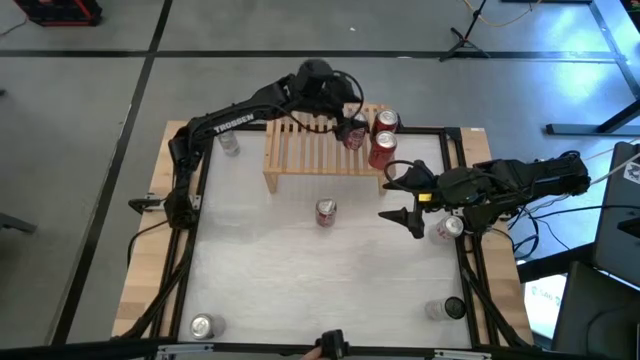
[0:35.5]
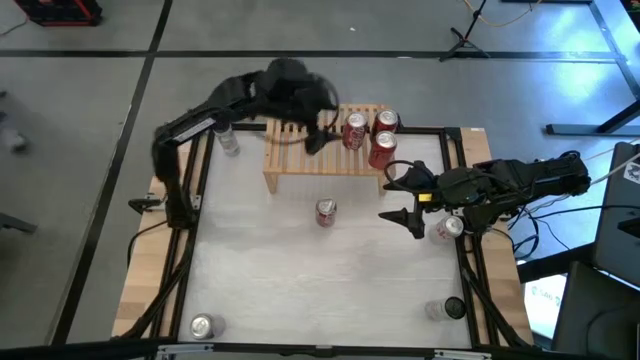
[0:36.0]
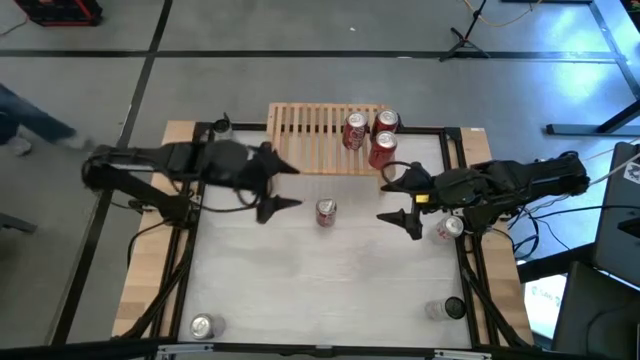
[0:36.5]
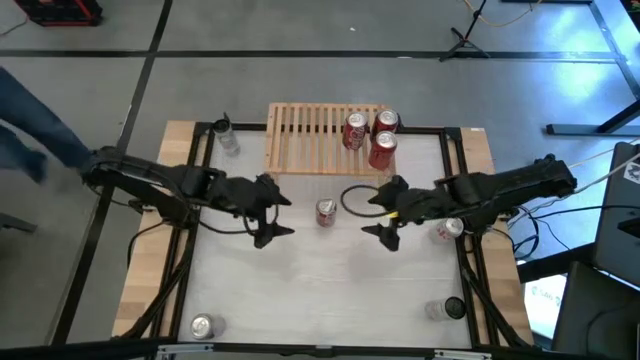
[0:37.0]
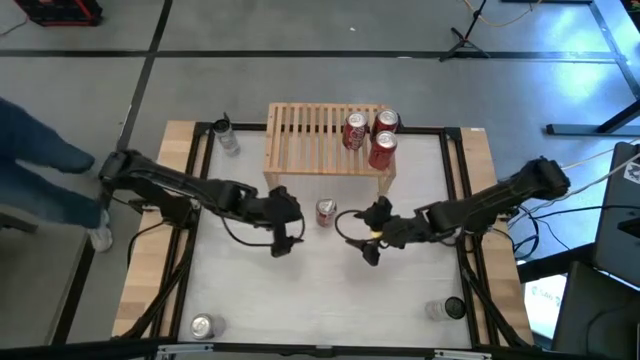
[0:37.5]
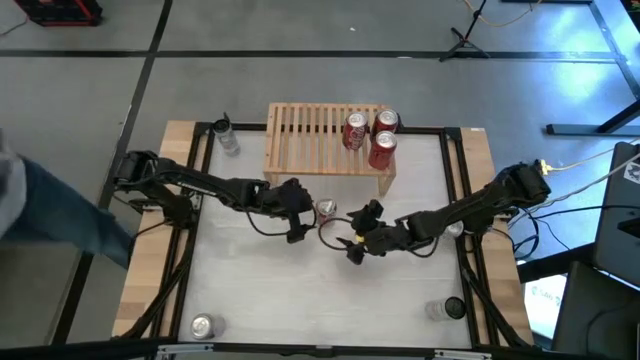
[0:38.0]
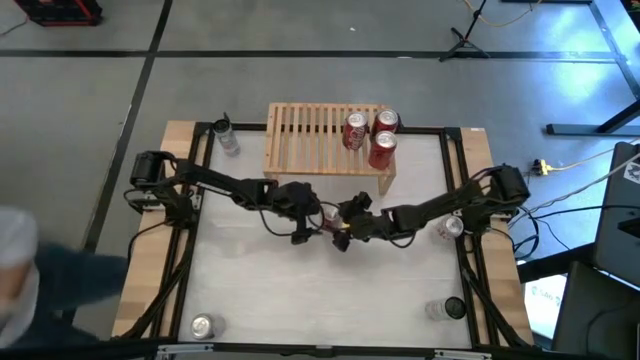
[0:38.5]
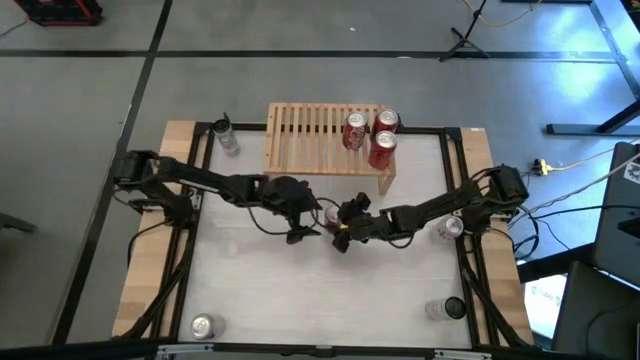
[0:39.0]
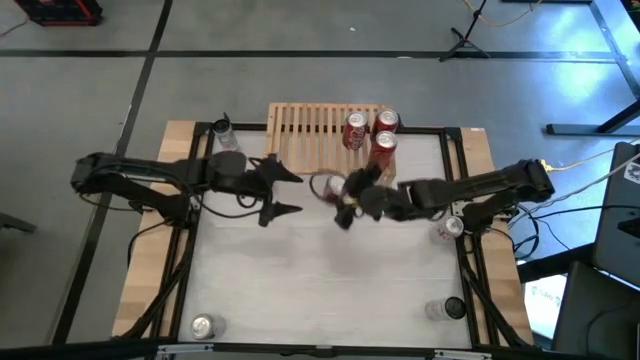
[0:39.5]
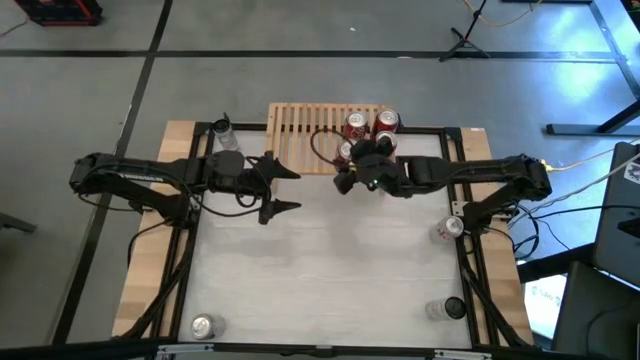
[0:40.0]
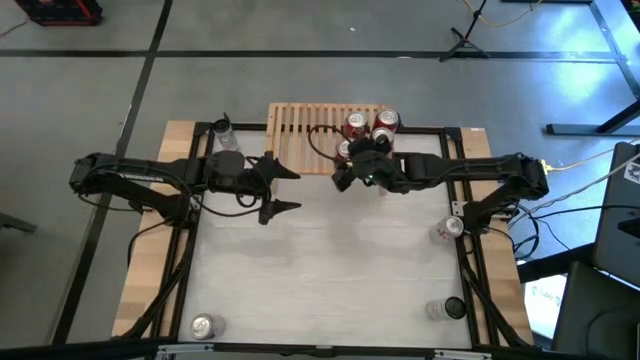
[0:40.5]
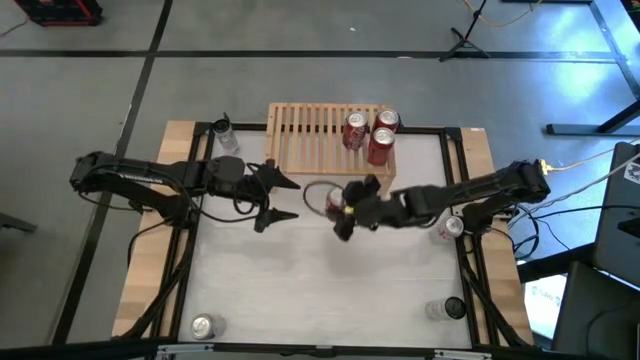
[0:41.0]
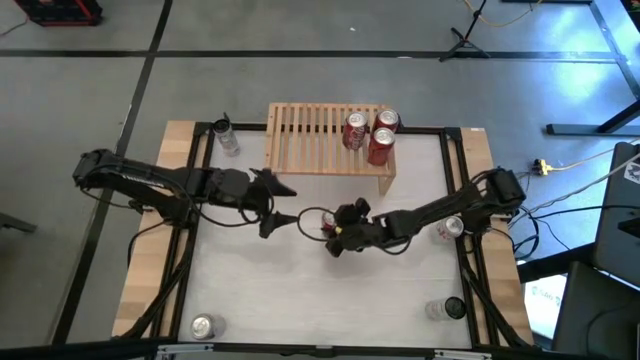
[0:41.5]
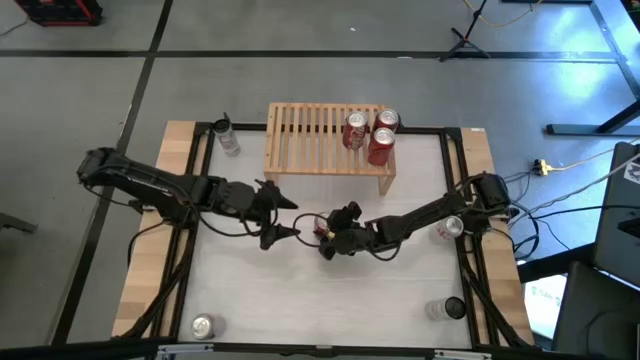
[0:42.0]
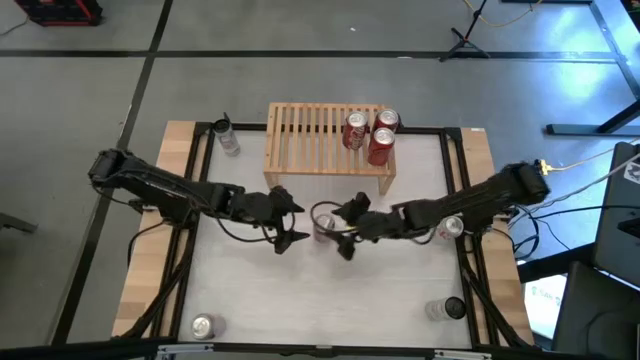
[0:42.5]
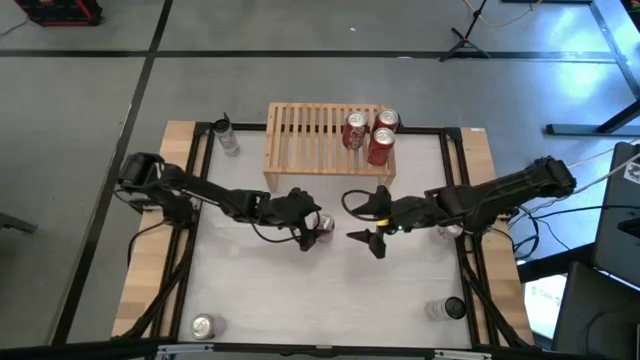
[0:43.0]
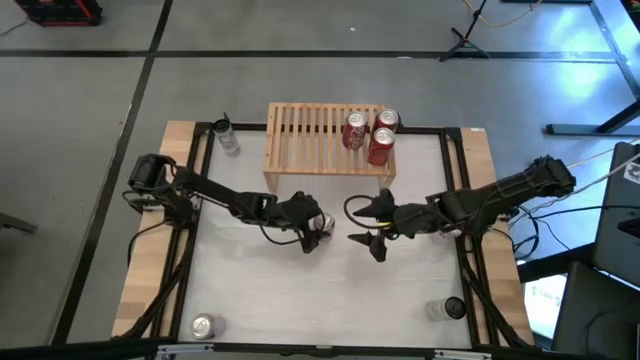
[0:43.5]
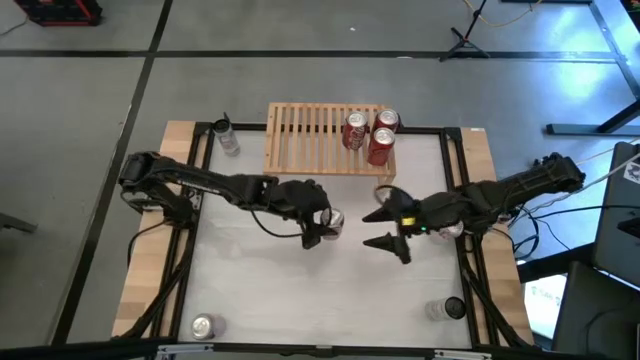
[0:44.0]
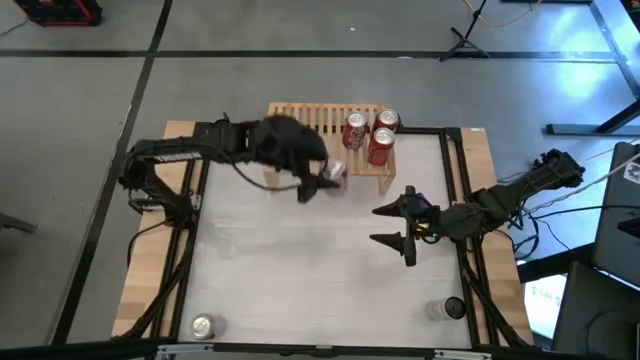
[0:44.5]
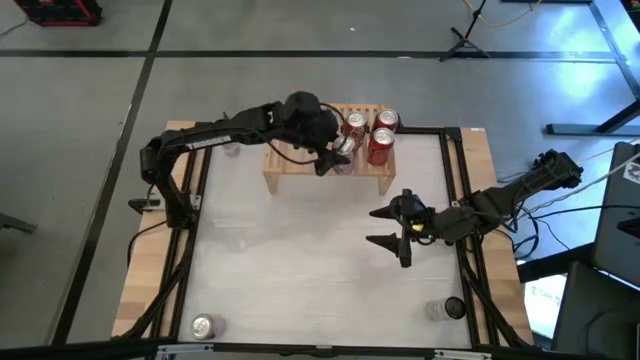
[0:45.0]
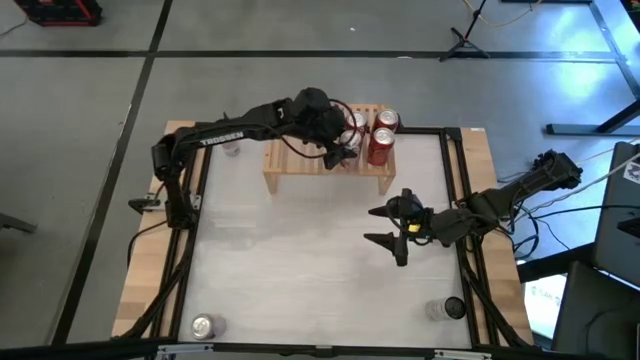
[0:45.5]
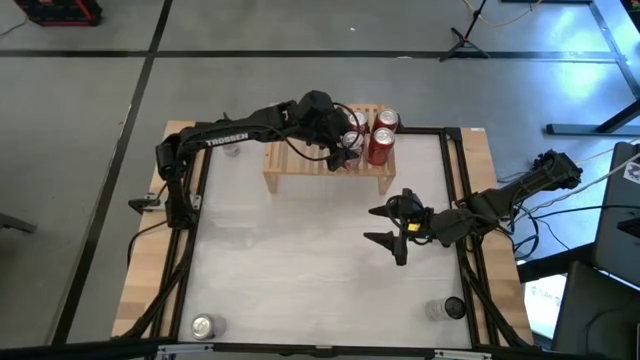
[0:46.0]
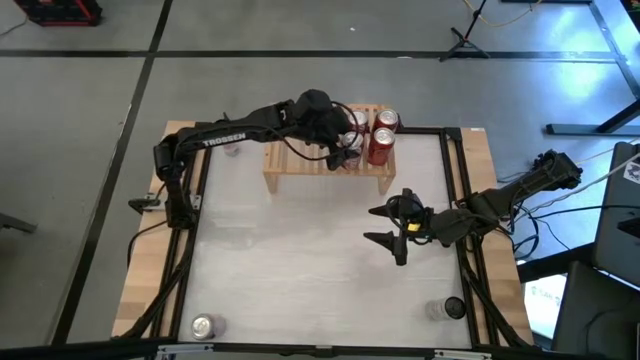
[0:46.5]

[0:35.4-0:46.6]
Task: Place canned beverage on shelf
Put the red white soda can aligned with the other red white soda can on the shelf

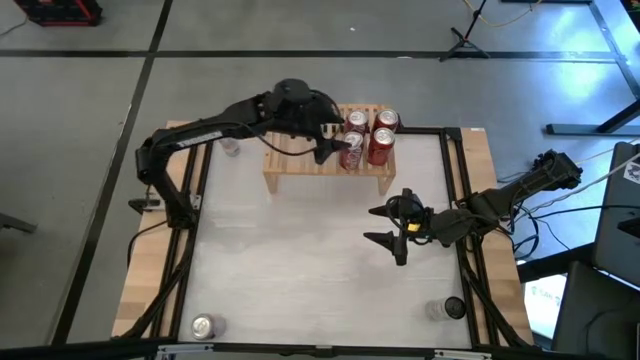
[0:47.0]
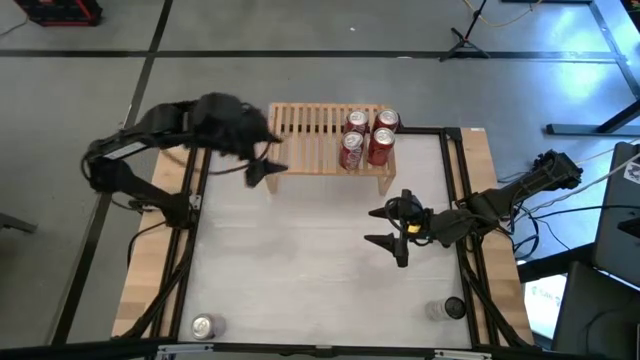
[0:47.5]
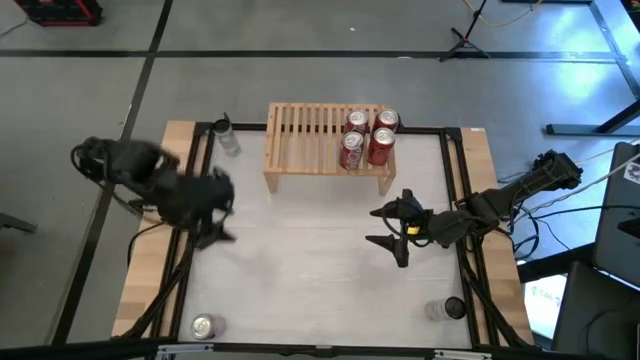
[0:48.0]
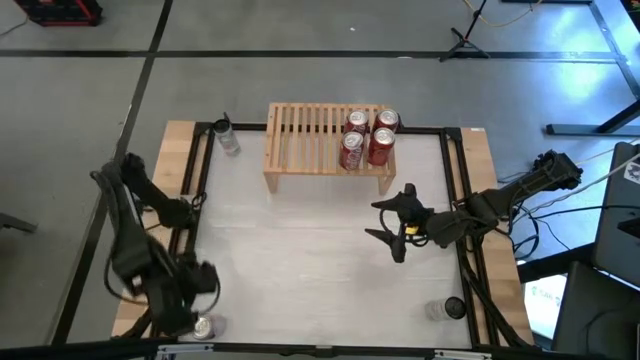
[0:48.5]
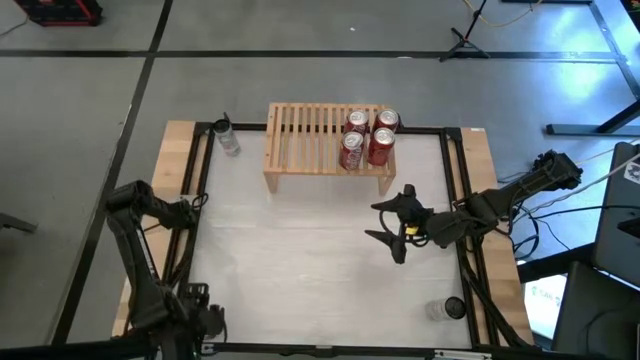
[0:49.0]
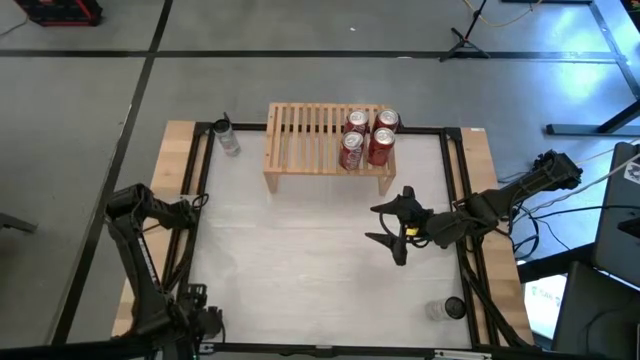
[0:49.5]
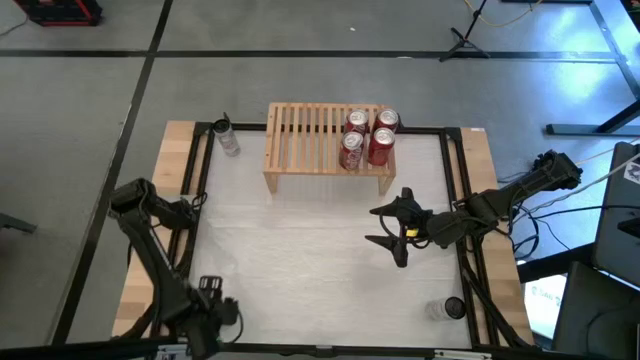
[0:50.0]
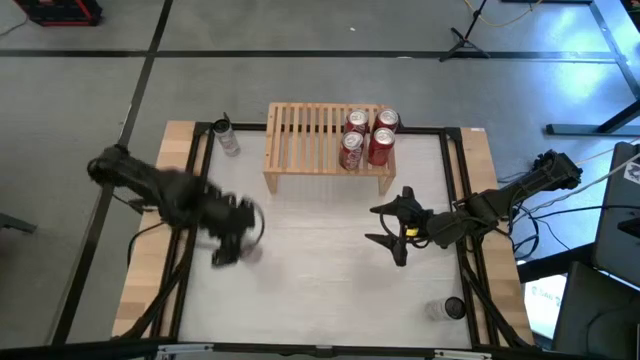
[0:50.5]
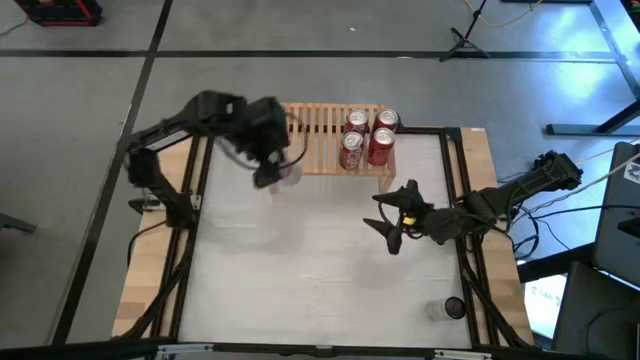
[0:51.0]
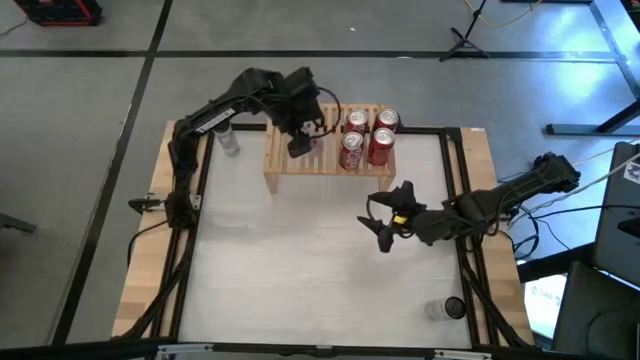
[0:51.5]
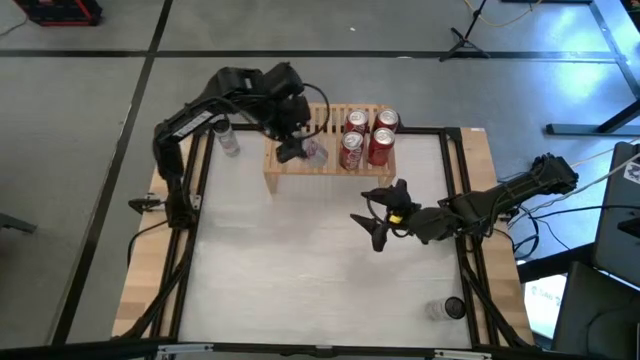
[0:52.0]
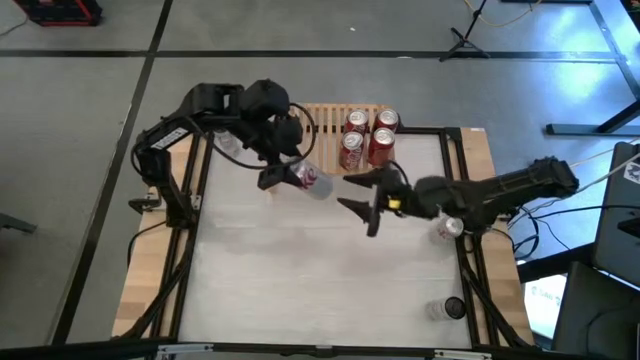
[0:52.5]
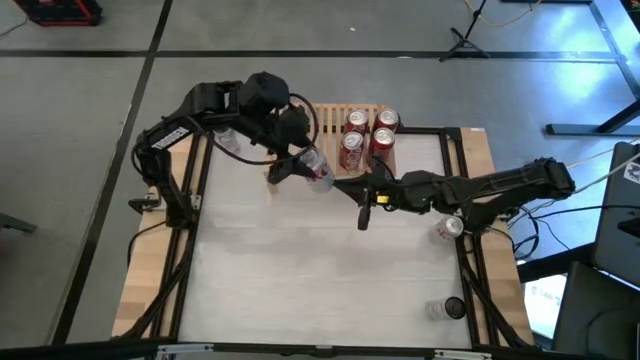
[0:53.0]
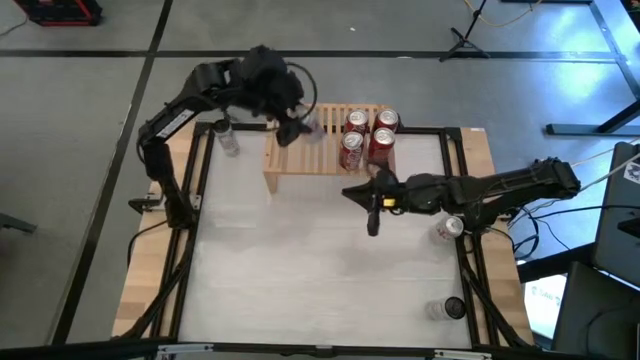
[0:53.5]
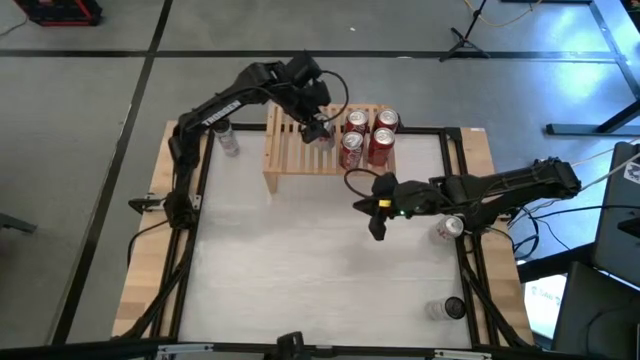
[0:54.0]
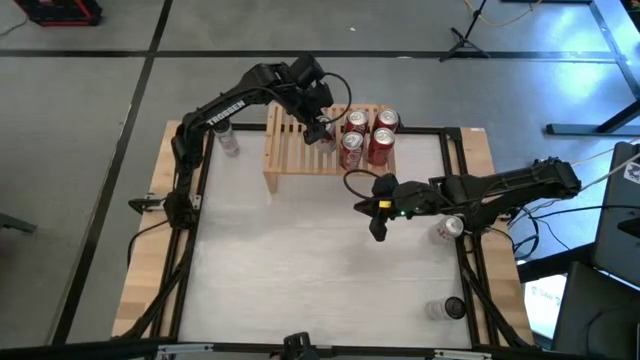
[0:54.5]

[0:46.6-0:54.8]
Put the bottom red silver soda can on the shelf

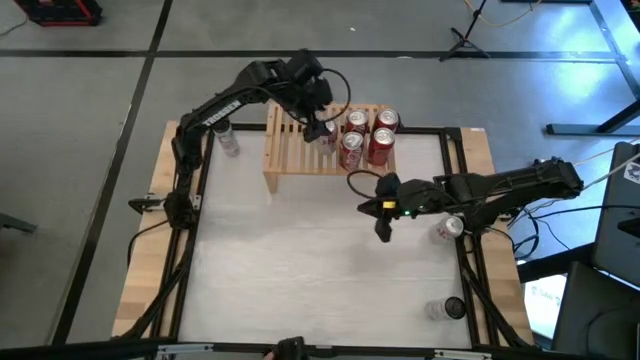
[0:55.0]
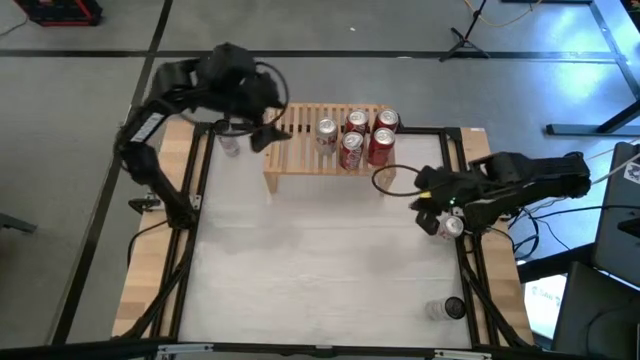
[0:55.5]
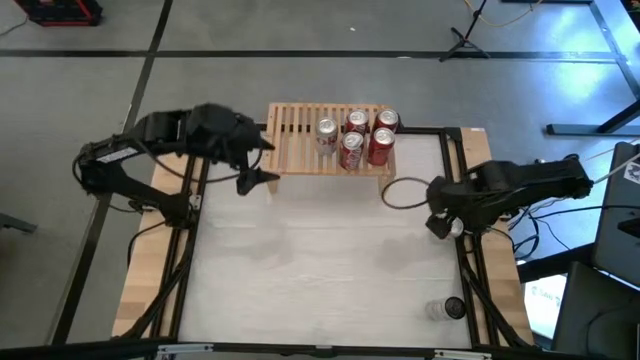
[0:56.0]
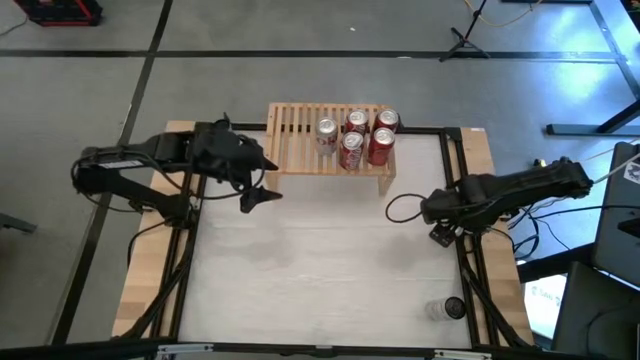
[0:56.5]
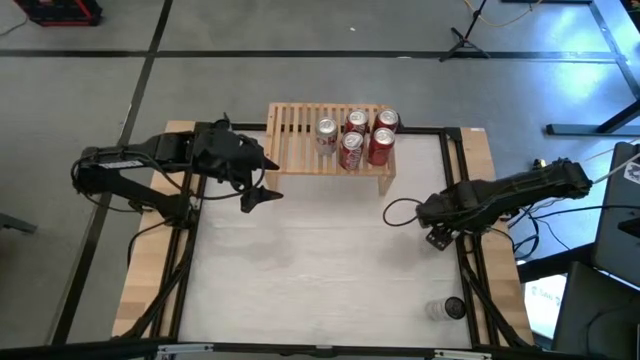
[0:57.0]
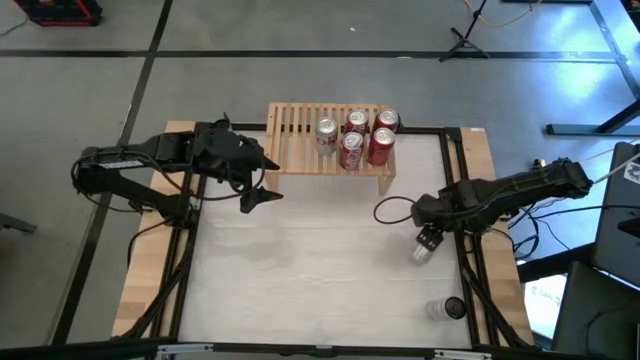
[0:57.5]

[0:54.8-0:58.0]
Put the red silver soda can aligned with the other red silver soda can on the shelf
